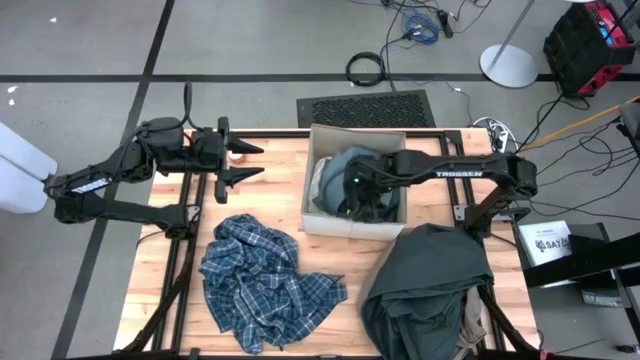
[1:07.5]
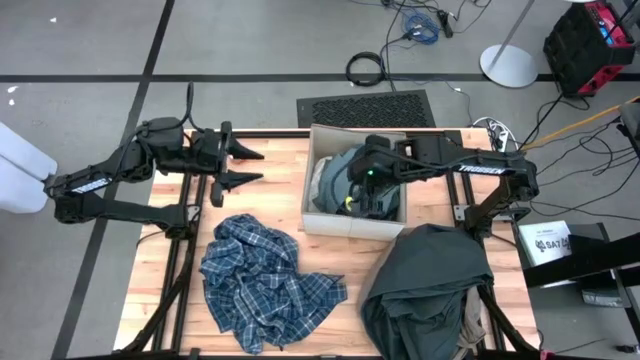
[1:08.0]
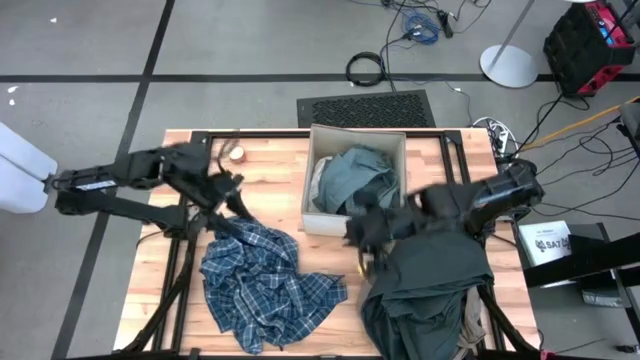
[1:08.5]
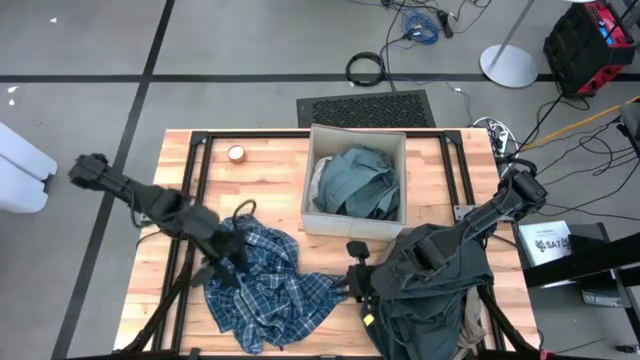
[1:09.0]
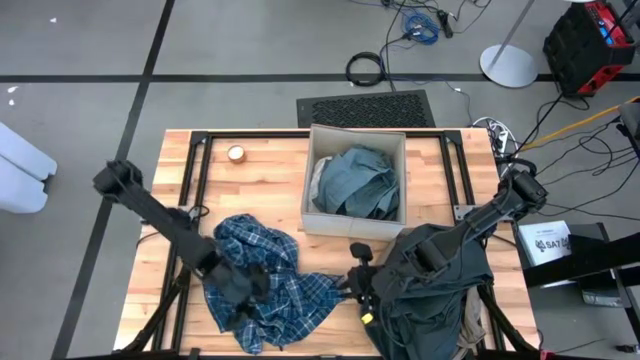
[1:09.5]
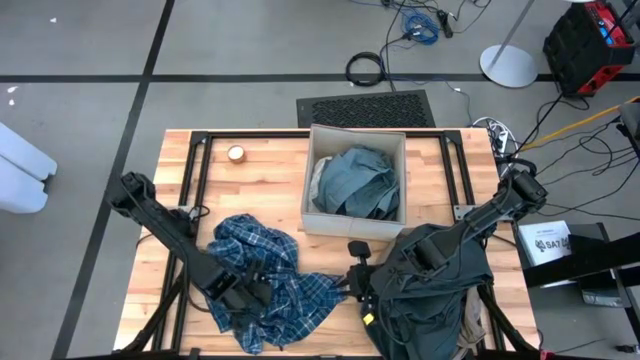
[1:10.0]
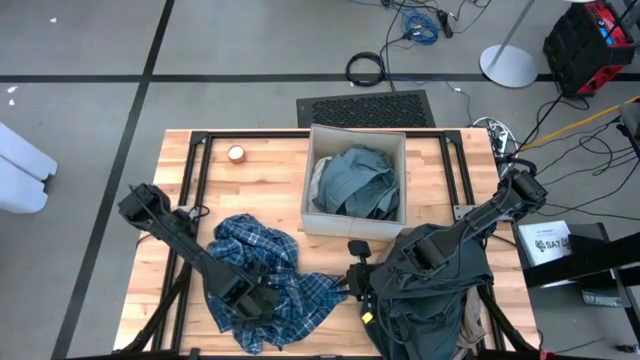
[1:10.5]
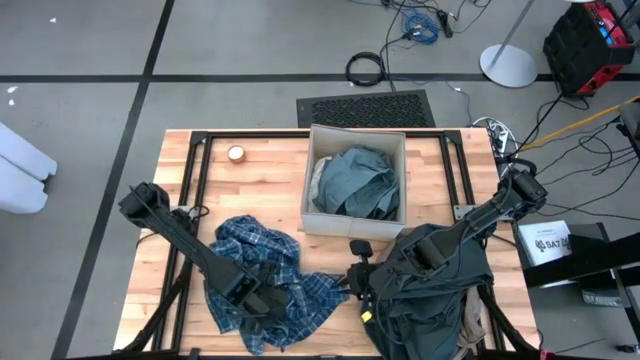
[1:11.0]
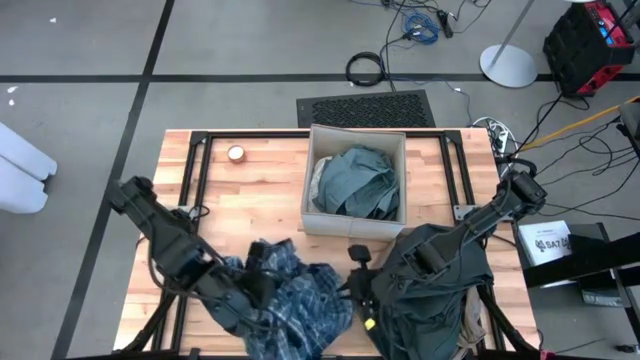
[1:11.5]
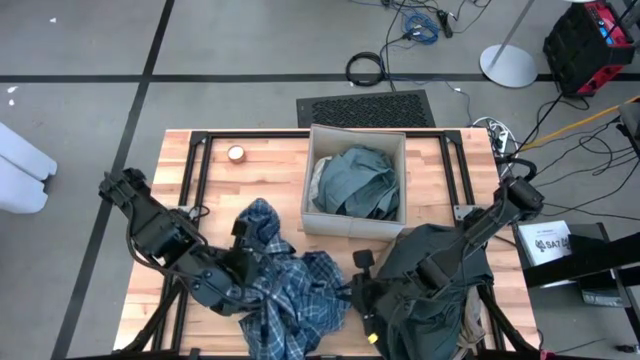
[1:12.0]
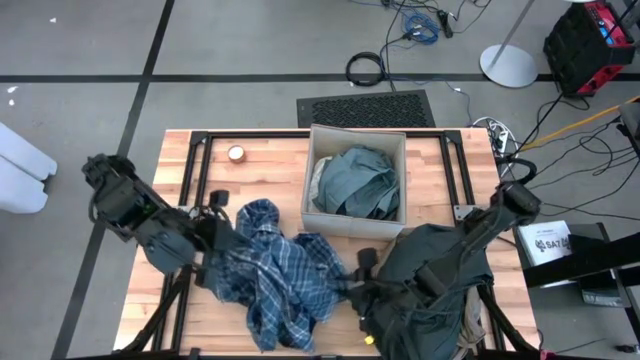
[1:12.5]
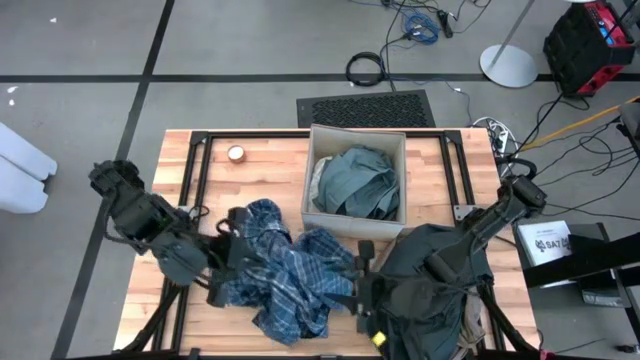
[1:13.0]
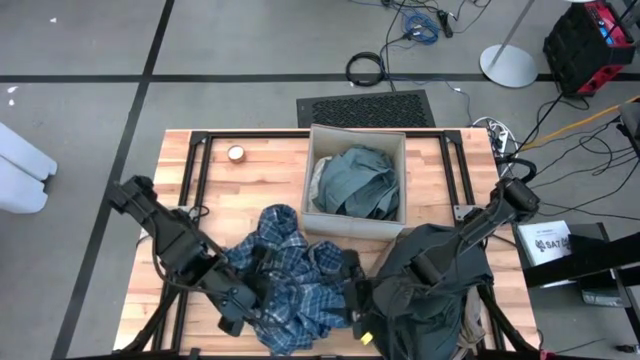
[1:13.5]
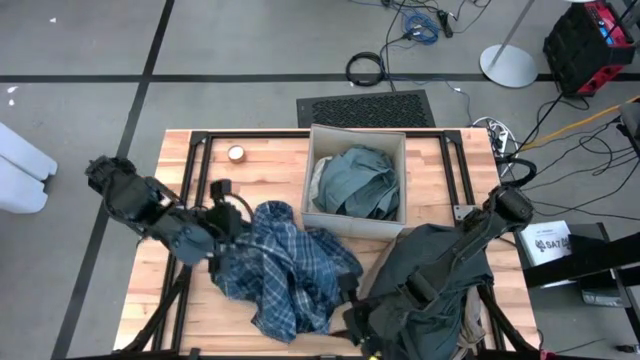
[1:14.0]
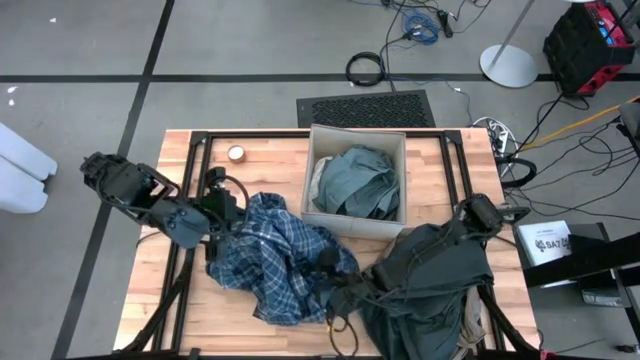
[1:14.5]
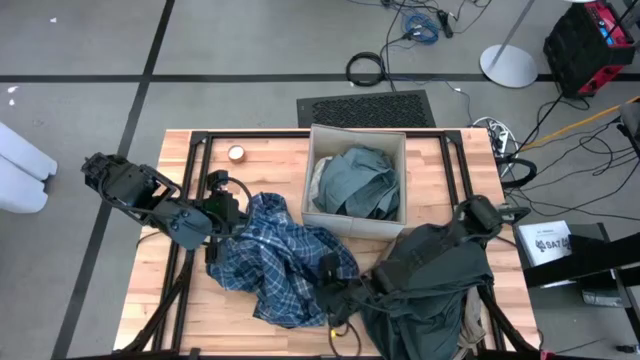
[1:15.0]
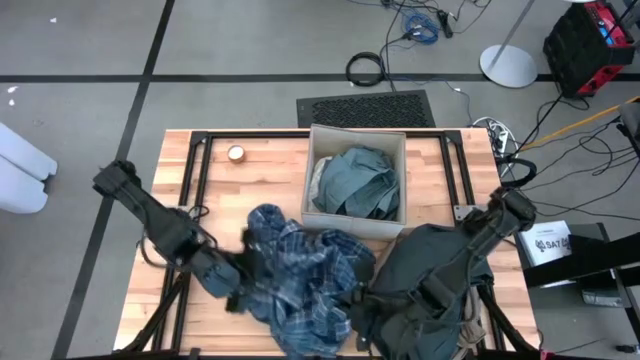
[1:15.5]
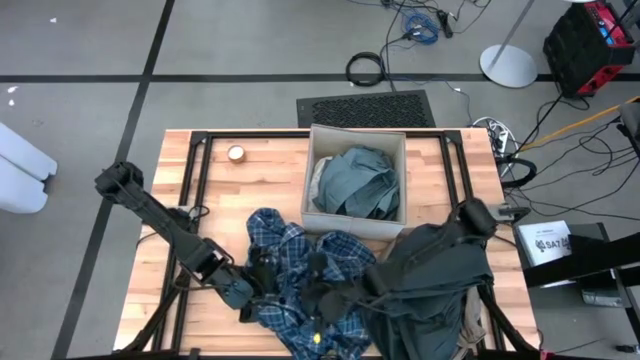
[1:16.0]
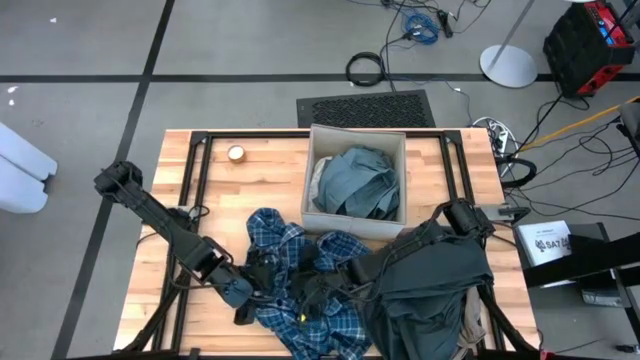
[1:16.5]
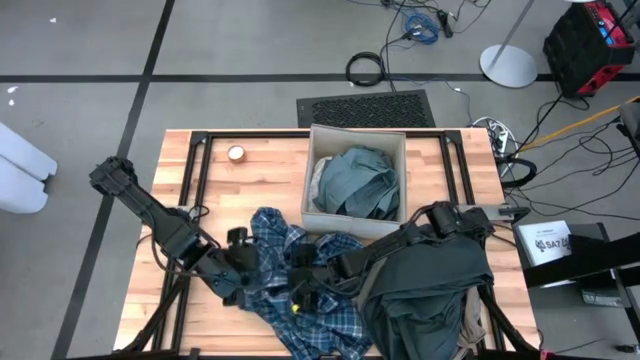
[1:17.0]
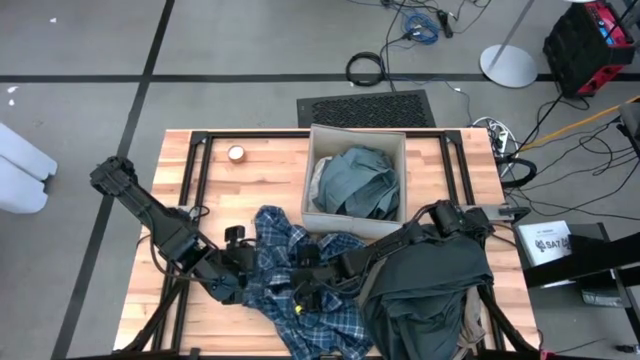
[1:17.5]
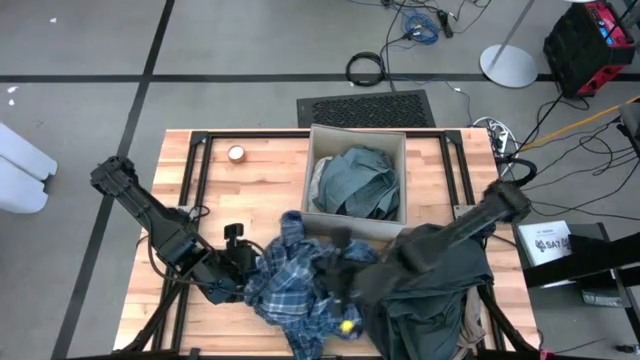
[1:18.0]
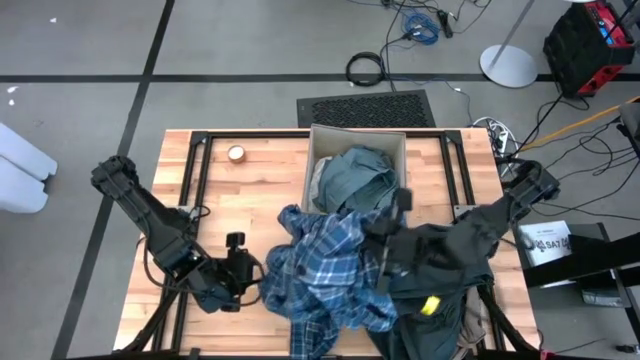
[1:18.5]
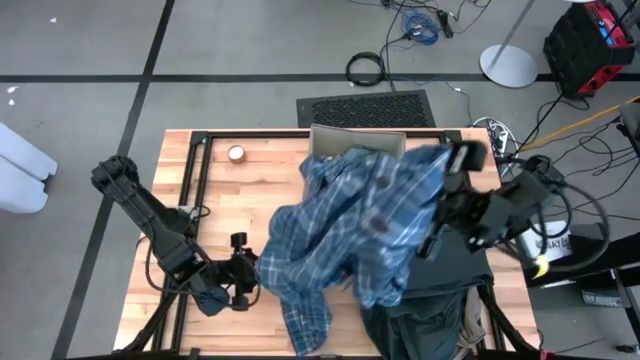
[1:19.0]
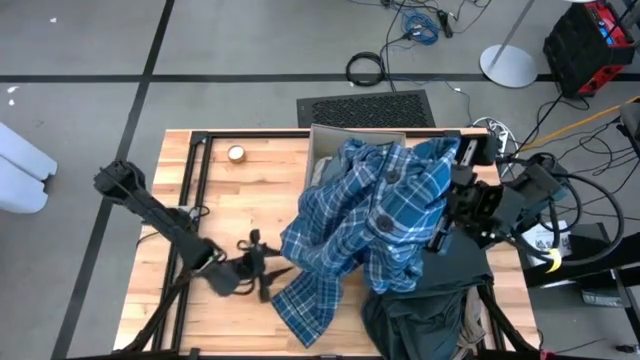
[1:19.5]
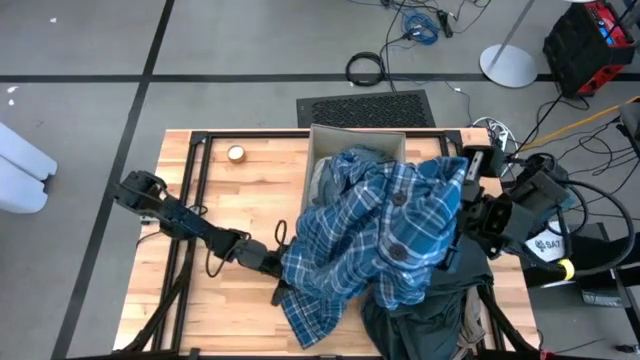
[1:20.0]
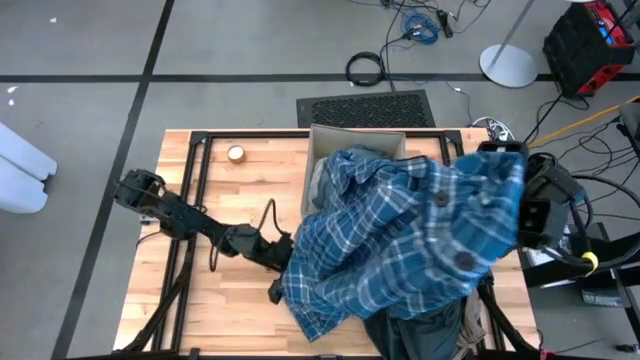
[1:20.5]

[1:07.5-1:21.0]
Task: Sort clothes
Put the blue plaid shirt into the laundry organizer
